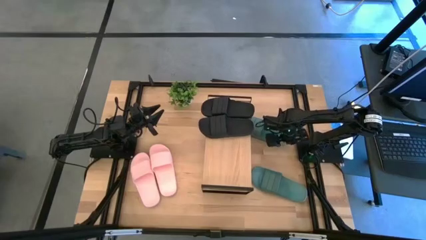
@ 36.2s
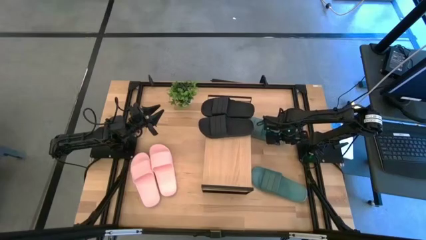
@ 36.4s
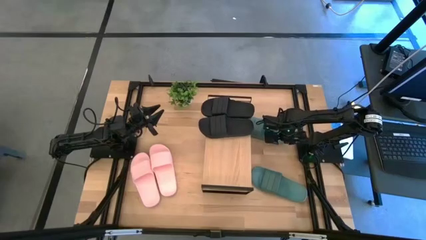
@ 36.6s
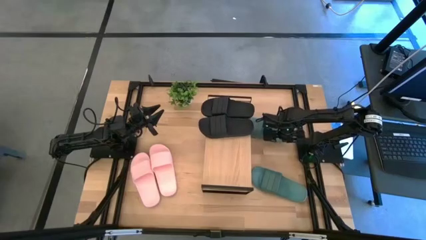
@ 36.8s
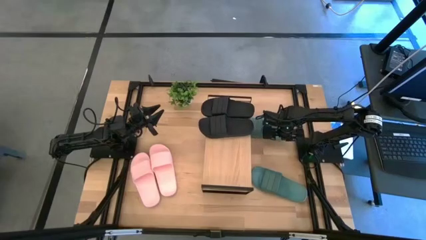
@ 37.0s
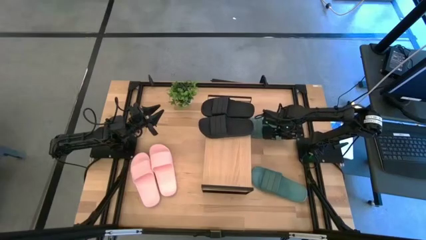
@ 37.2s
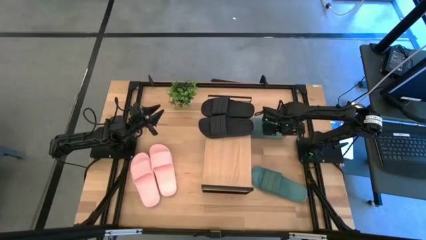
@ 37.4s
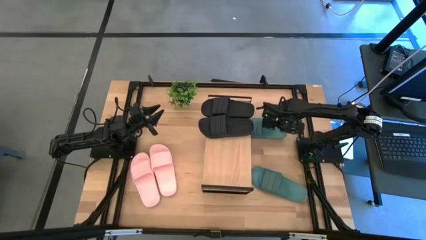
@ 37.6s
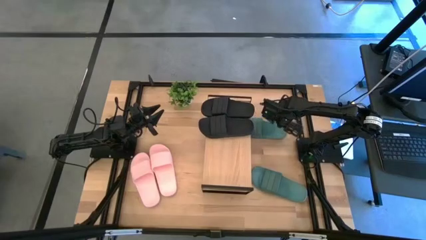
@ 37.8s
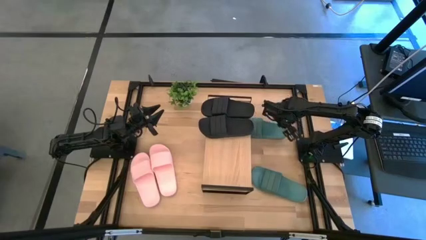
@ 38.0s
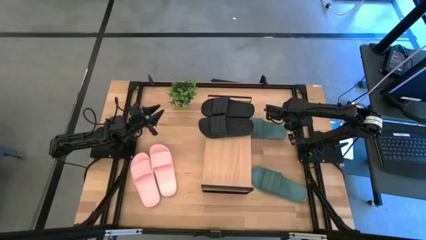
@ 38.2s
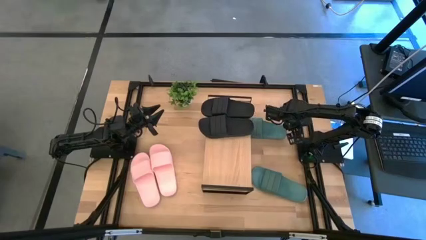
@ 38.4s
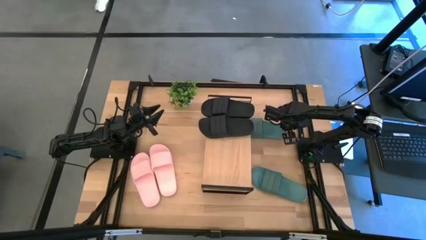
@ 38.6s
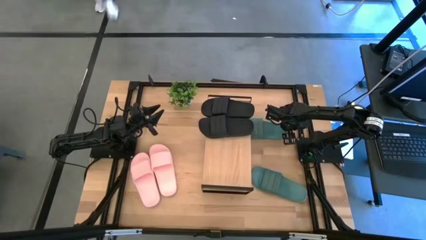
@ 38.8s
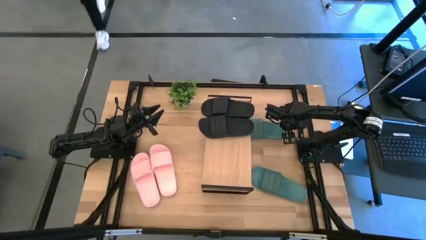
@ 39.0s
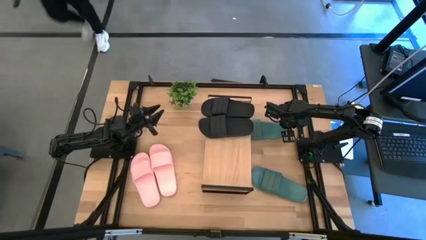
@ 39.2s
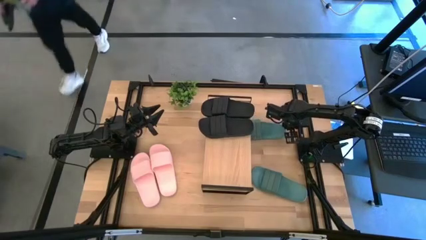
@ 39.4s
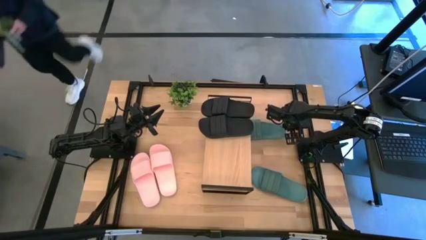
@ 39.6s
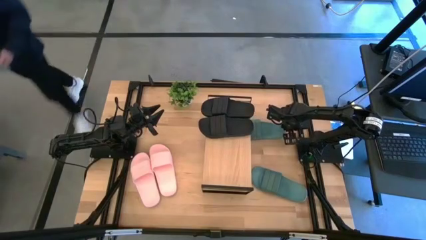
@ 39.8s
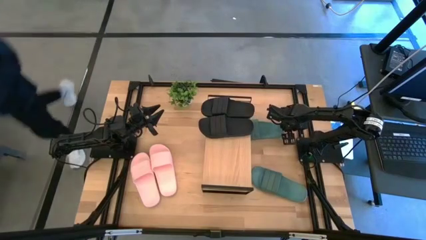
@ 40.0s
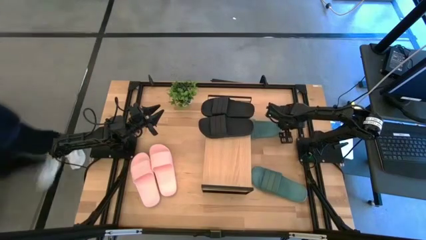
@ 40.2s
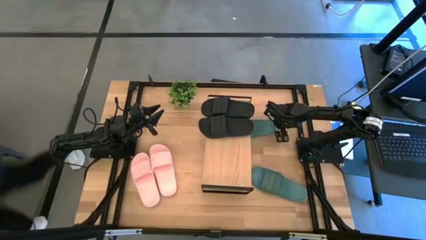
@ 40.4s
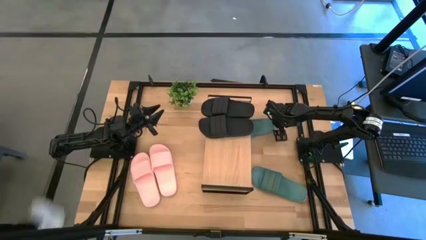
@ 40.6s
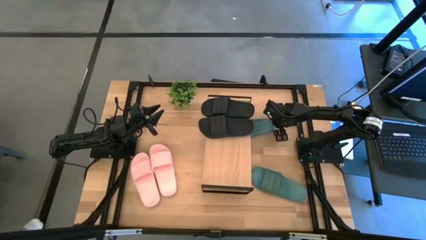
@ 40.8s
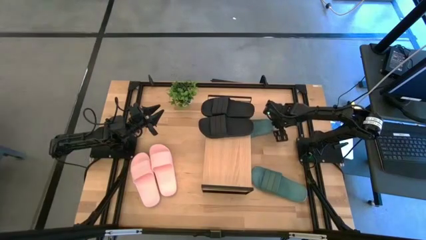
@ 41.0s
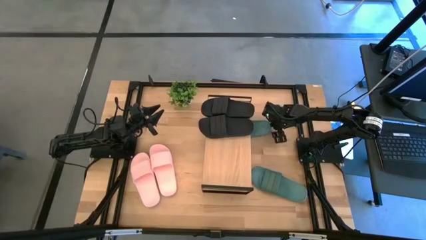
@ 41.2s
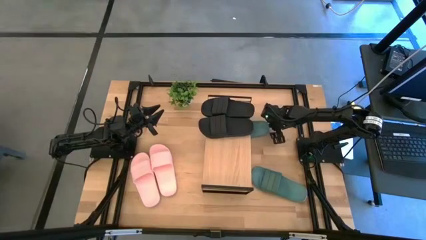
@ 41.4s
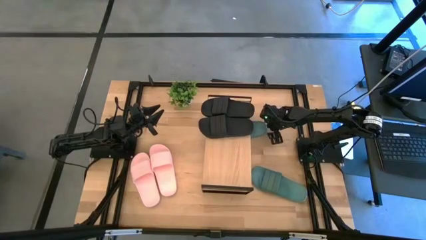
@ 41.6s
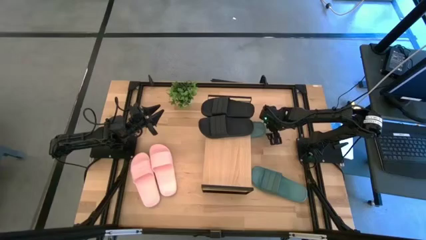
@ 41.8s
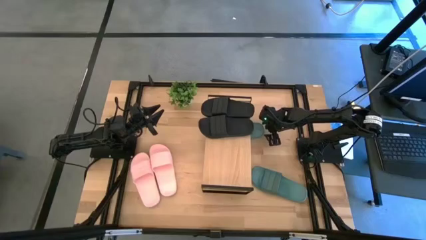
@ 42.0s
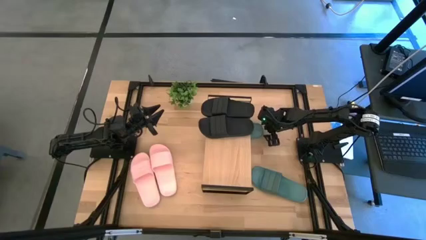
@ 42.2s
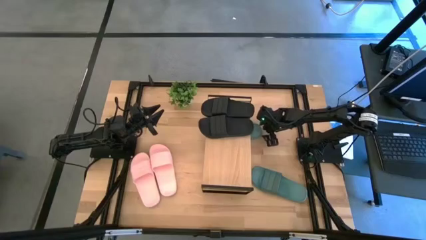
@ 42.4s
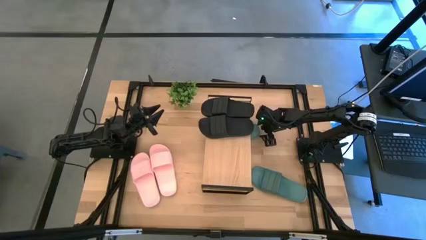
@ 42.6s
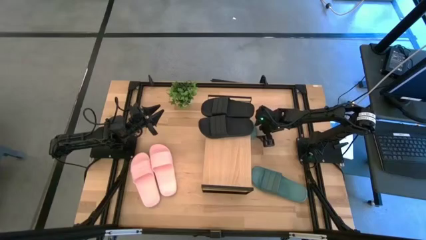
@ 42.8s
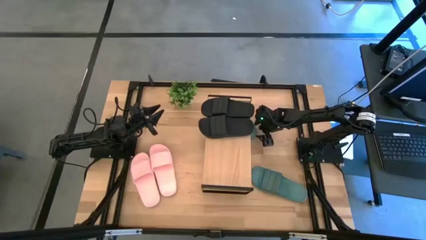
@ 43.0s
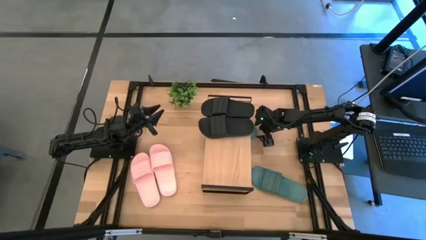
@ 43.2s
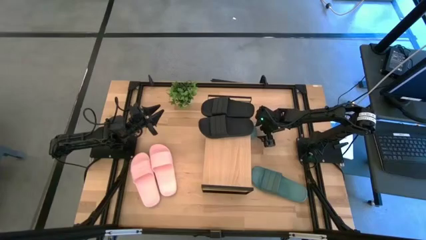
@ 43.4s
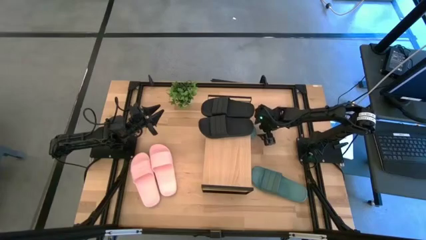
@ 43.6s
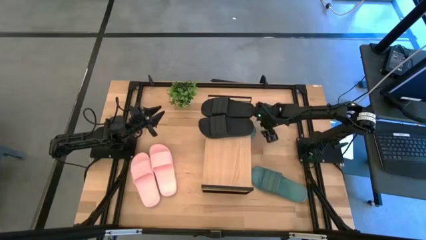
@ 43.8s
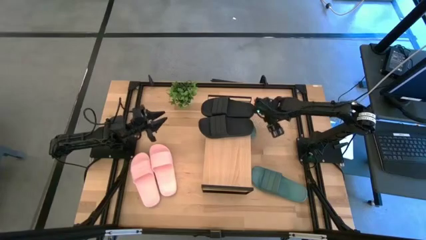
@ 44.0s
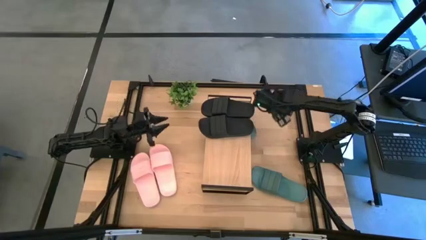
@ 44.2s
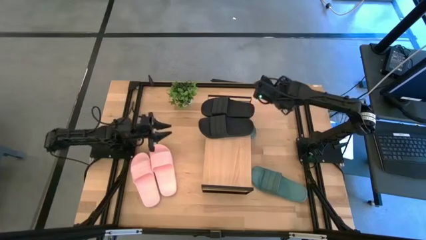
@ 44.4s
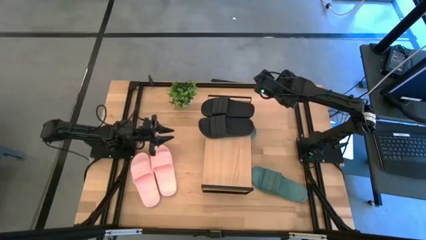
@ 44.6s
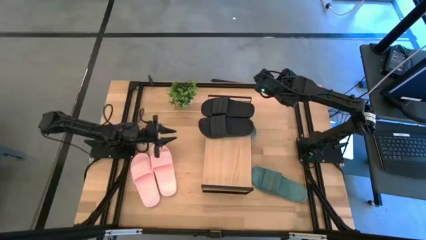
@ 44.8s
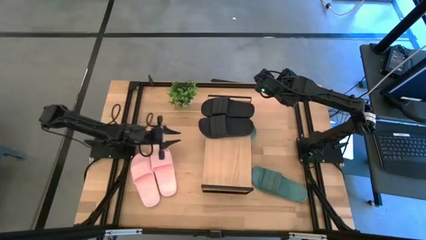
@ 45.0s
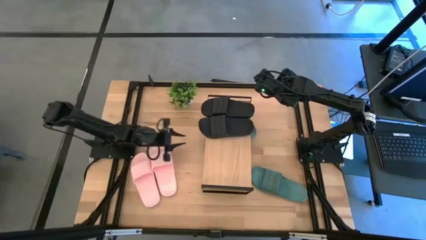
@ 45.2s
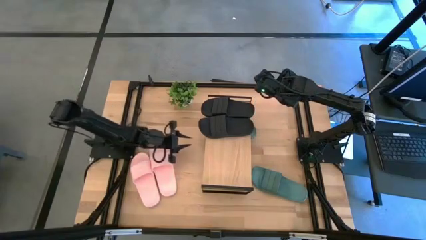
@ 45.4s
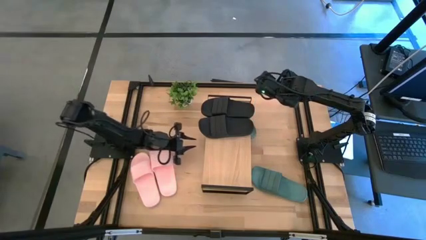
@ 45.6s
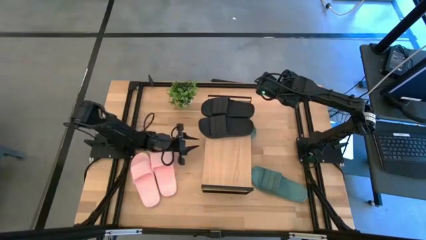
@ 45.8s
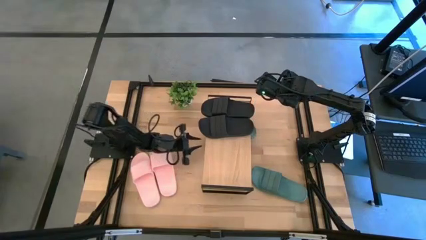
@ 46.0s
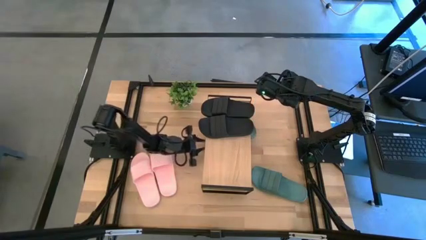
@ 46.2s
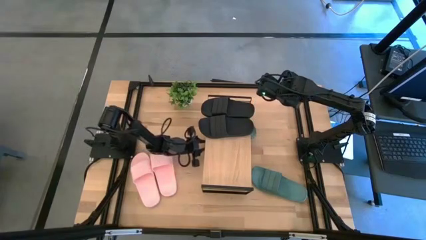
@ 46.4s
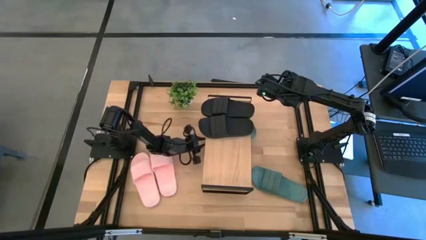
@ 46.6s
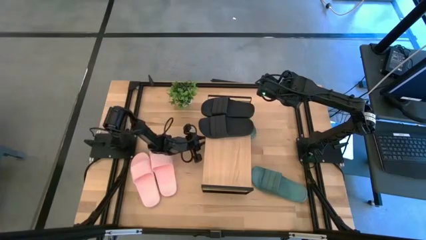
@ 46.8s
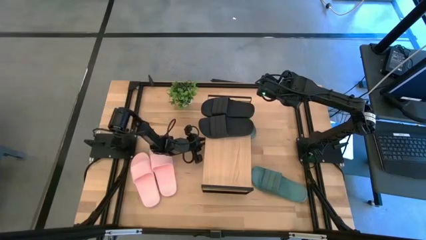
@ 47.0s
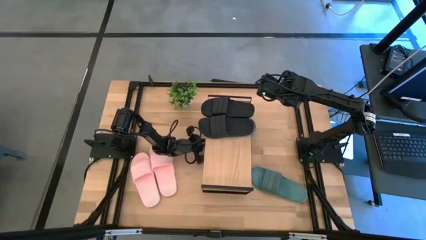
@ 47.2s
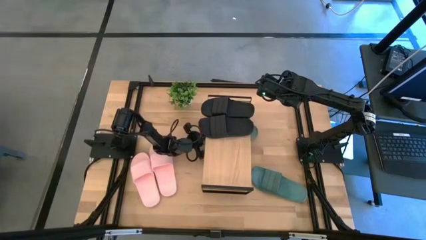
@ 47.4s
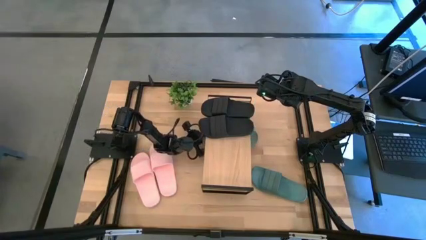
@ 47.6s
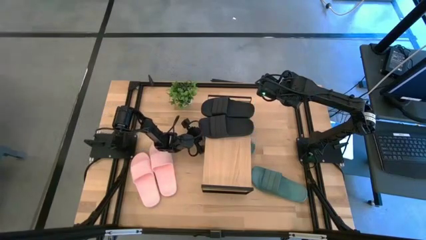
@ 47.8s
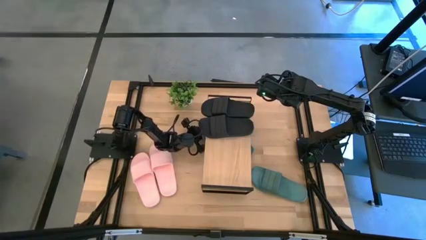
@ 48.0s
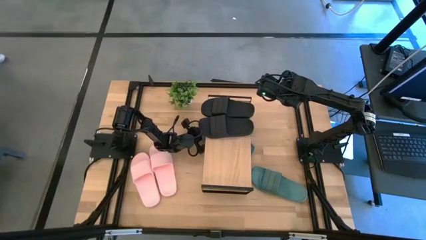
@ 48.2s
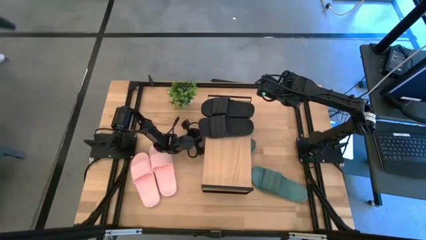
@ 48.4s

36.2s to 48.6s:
Task: Pick and place slides into the shelf
Put the right green slide under the shelf

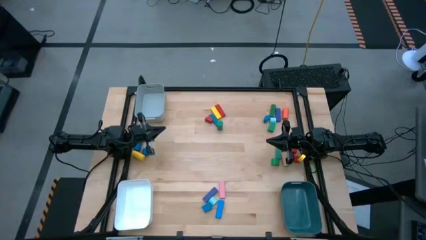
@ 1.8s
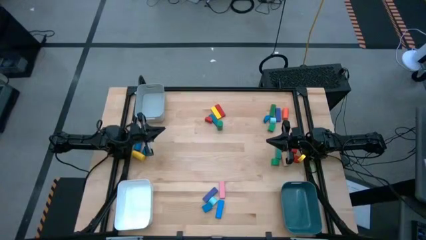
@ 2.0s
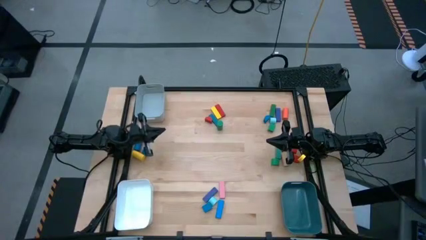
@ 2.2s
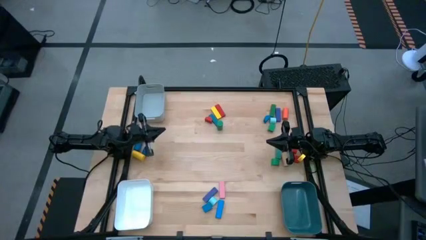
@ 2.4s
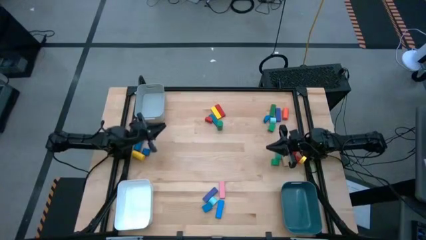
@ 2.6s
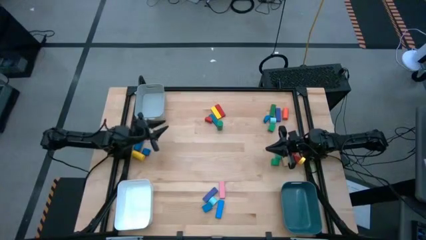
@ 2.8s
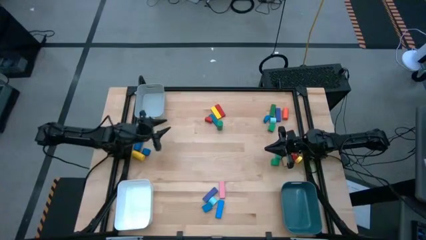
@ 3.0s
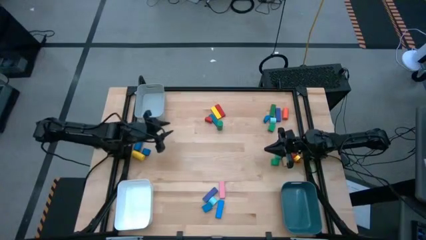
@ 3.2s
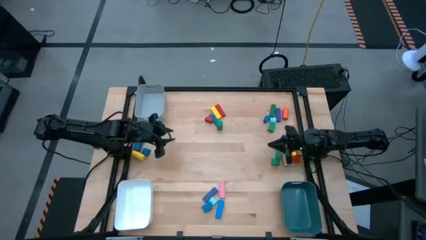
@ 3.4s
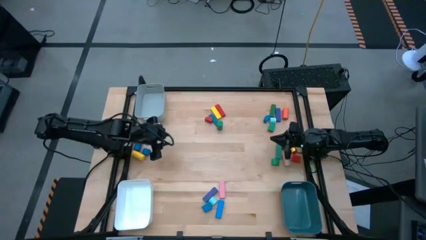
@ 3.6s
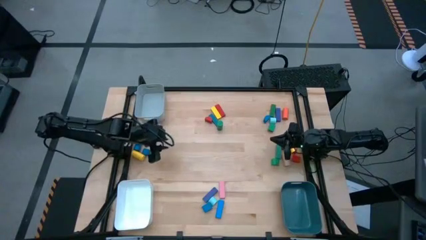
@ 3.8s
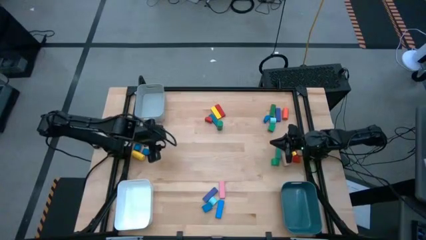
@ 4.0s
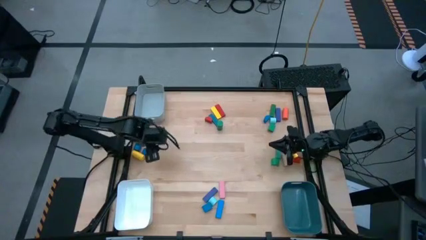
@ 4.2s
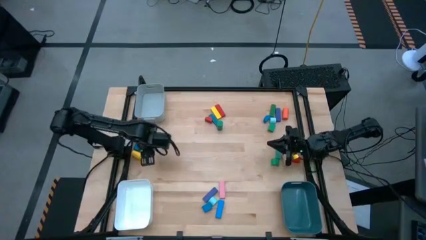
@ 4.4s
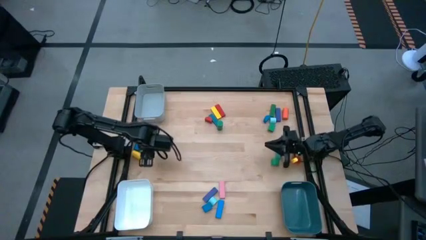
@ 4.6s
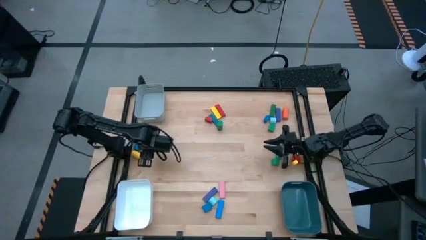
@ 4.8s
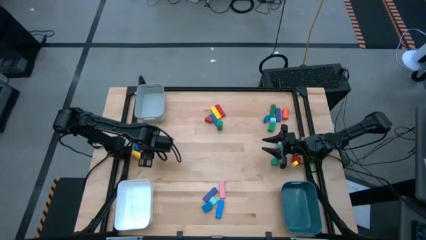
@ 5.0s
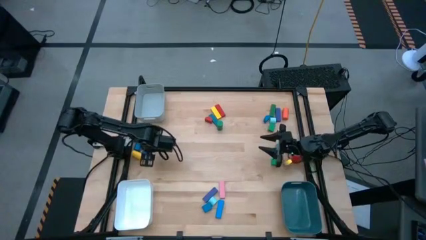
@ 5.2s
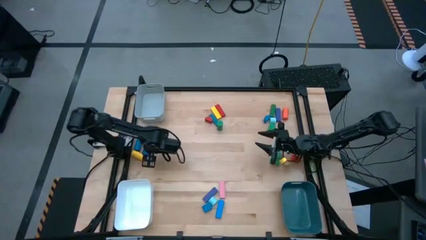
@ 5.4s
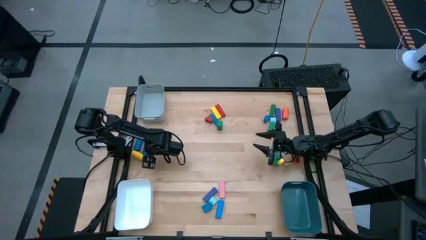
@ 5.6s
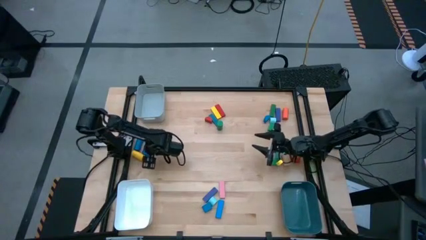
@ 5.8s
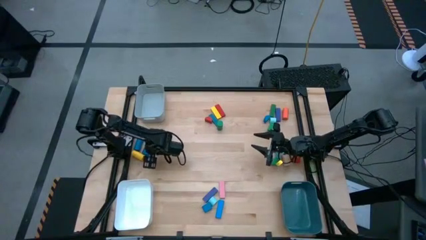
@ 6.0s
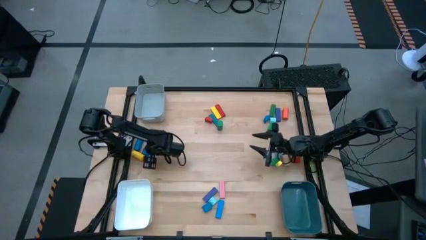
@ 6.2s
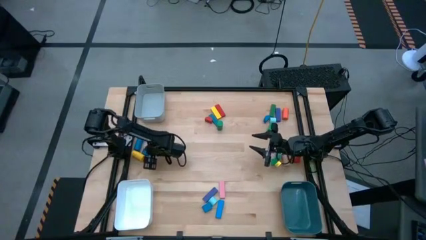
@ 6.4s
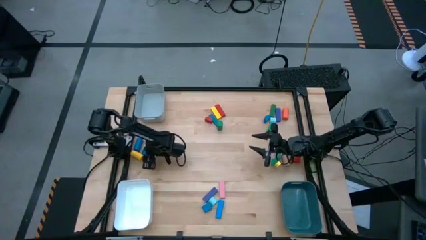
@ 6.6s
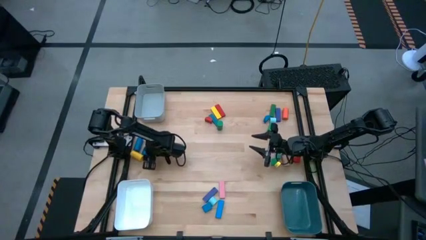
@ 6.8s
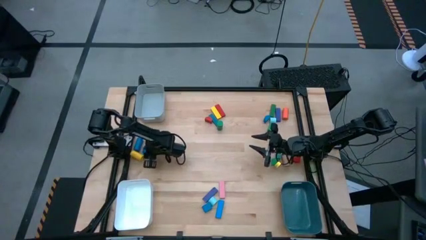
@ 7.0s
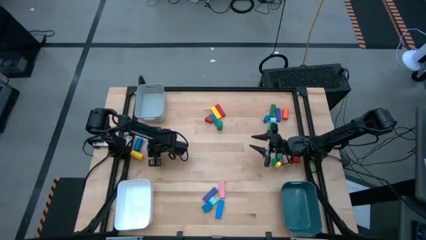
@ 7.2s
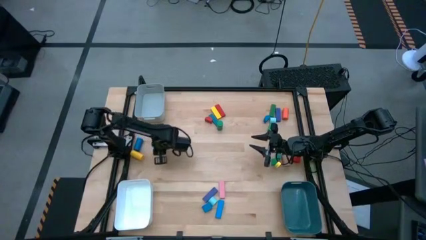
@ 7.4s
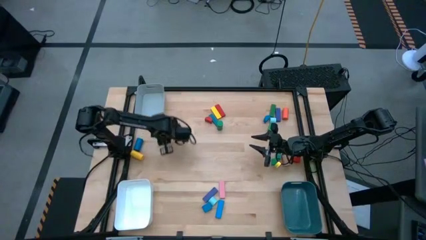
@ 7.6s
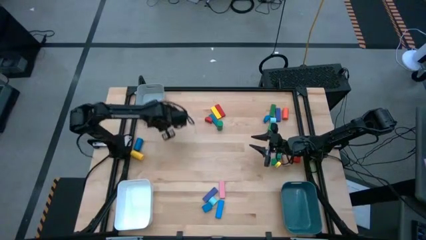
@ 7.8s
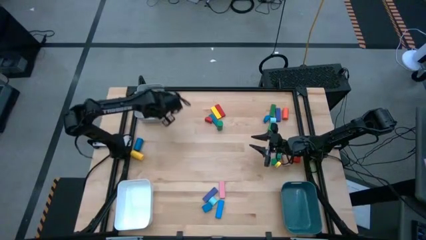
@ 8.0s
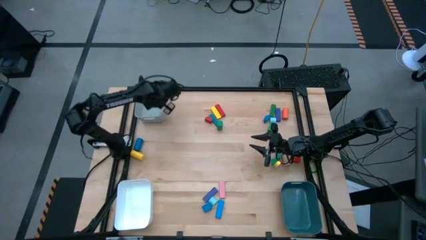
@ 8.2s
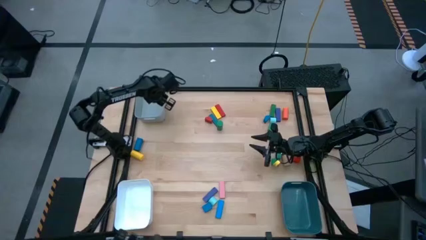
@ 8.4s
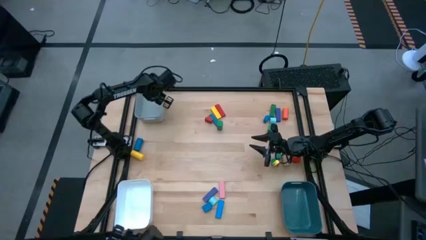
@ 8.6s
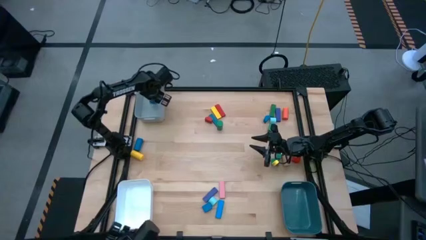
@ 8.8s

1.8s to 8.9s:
Task: Sort blocks by size
Put the blue half-circle block into the gray bin
